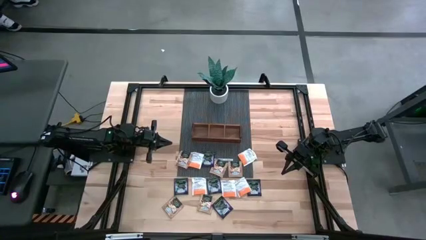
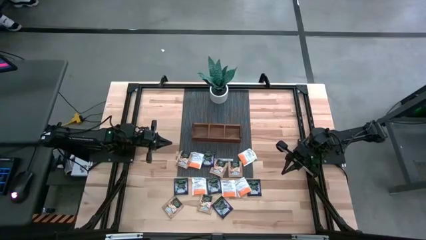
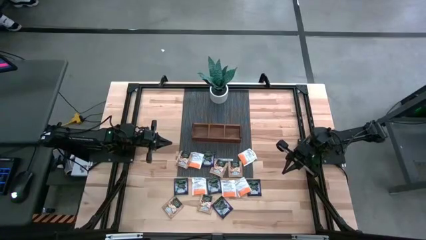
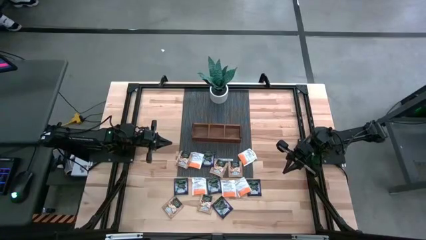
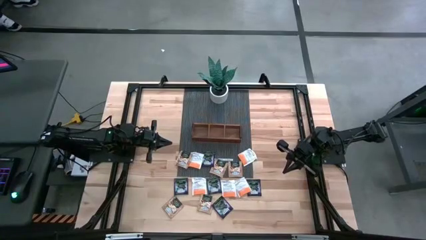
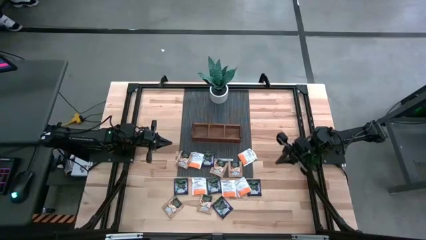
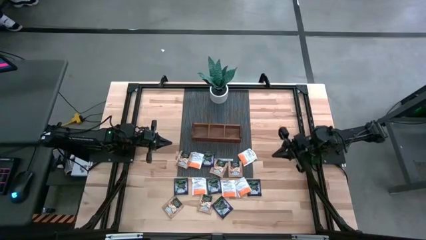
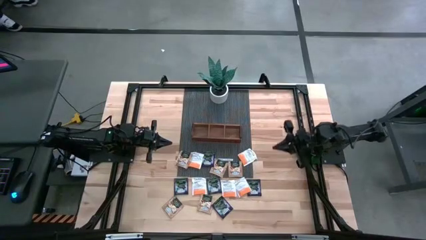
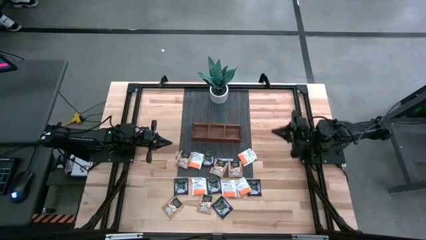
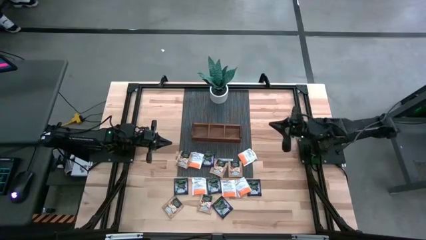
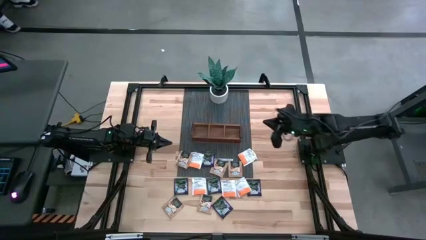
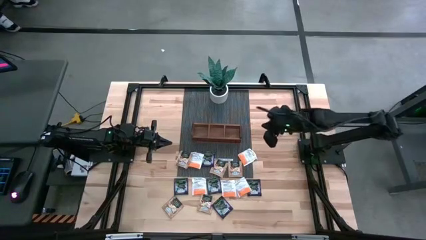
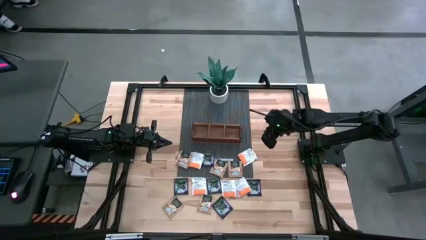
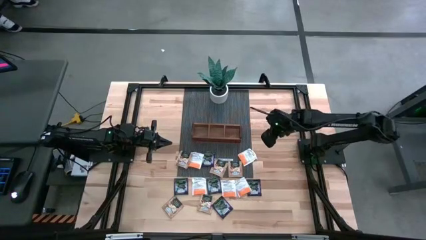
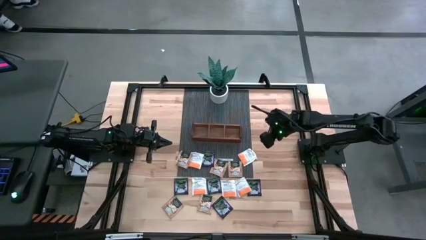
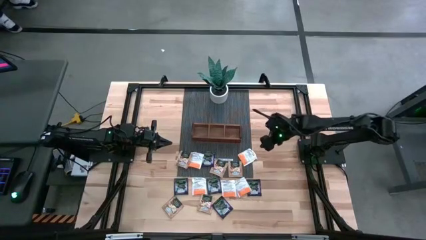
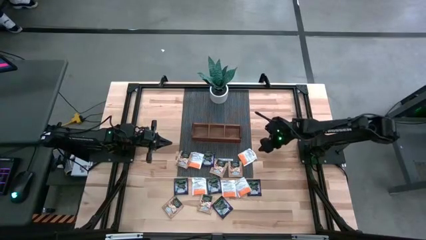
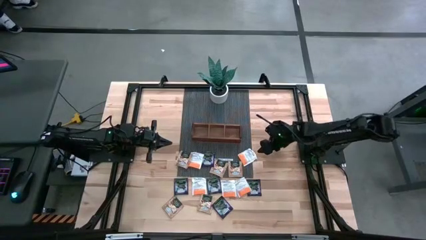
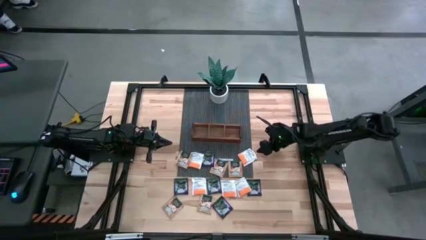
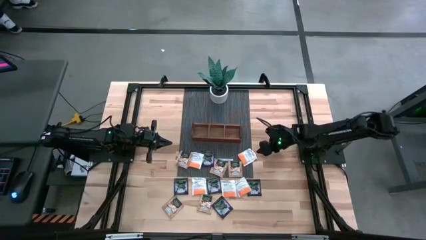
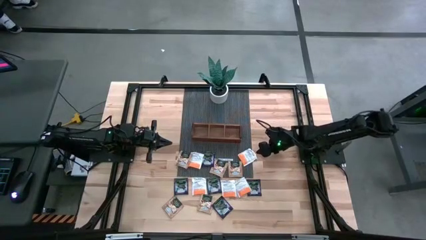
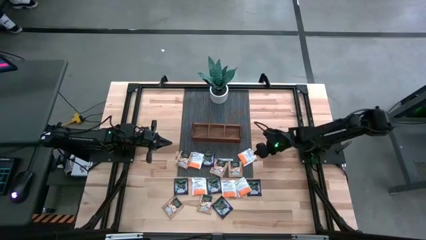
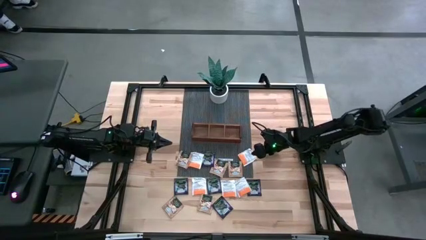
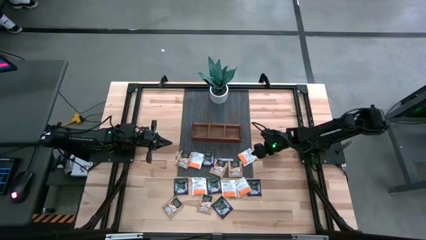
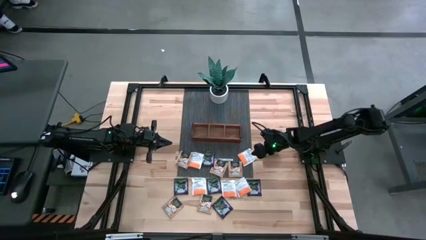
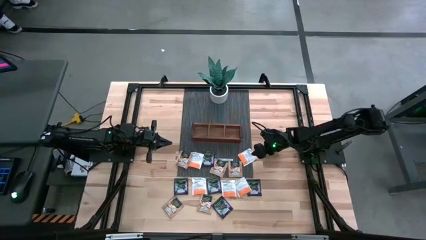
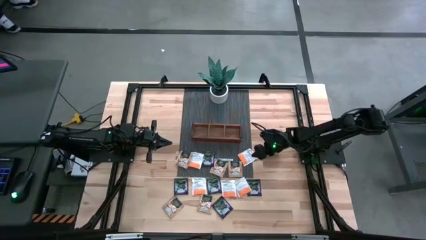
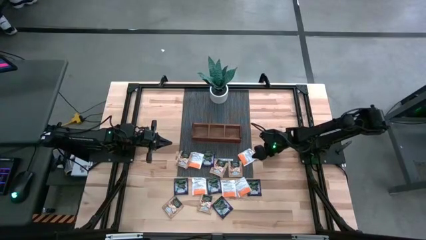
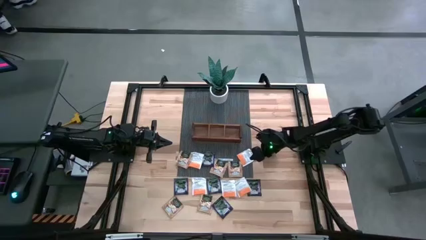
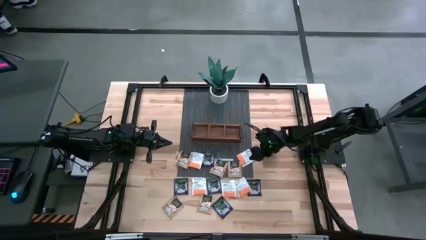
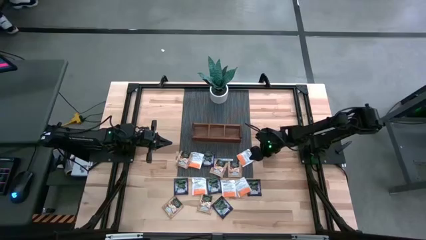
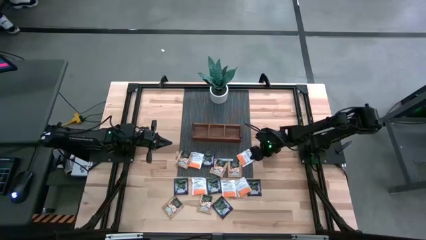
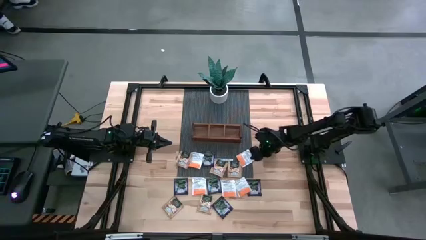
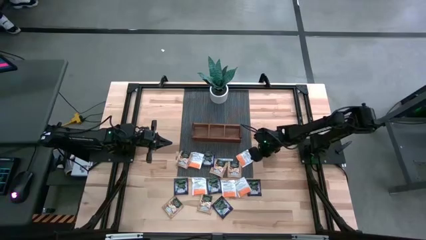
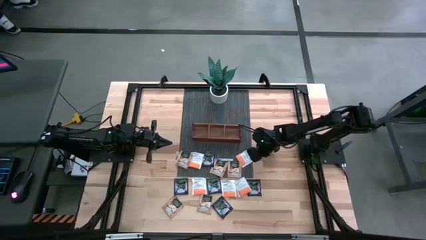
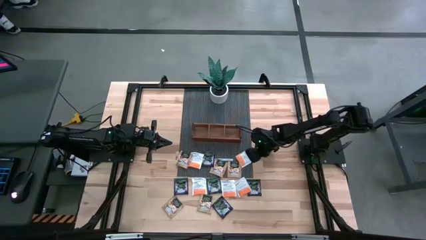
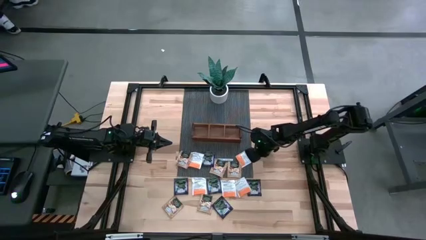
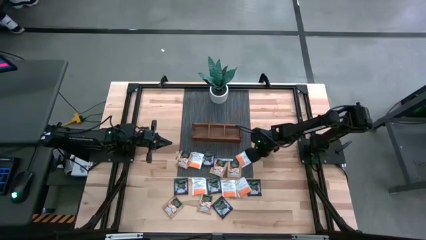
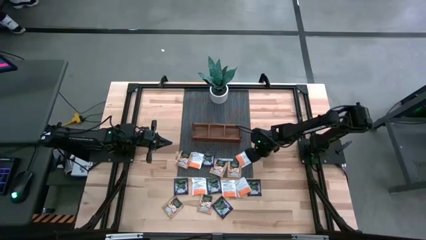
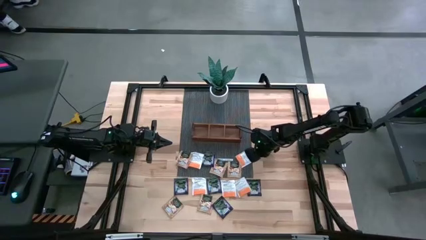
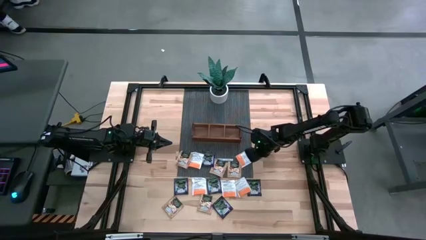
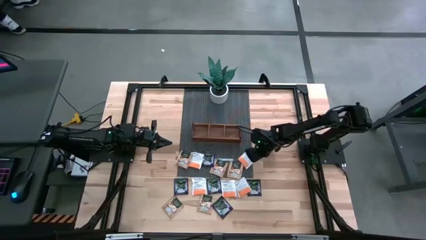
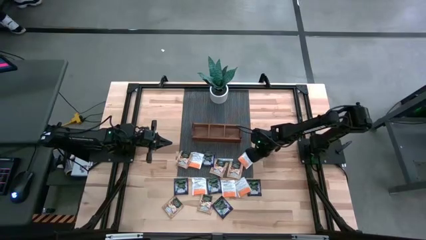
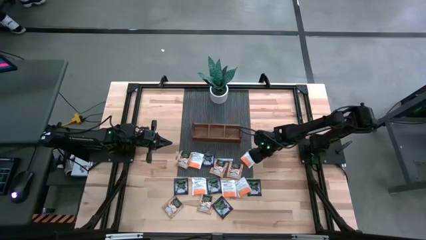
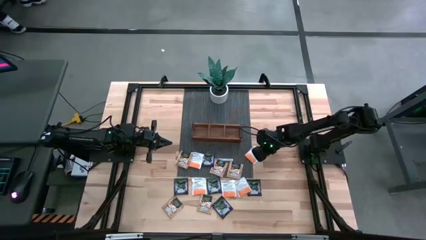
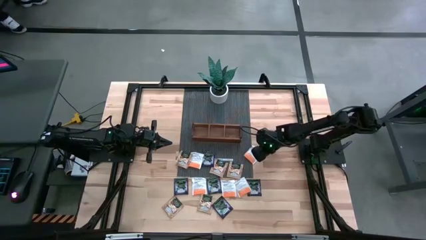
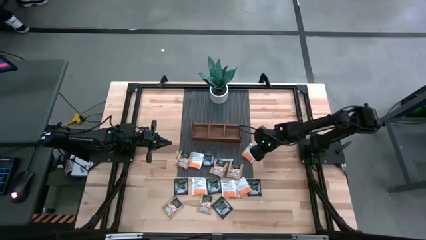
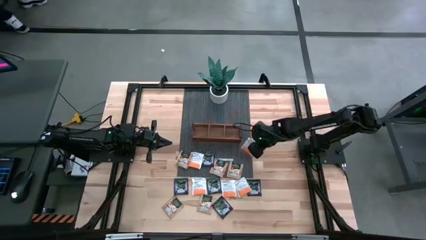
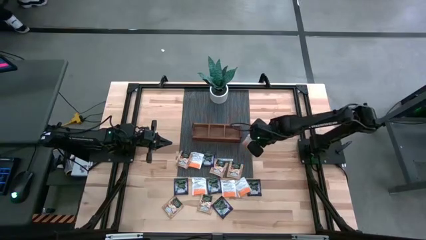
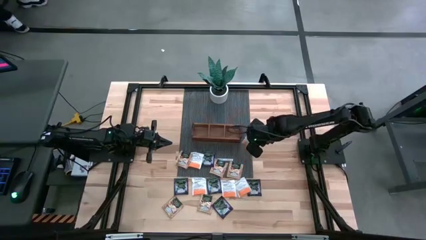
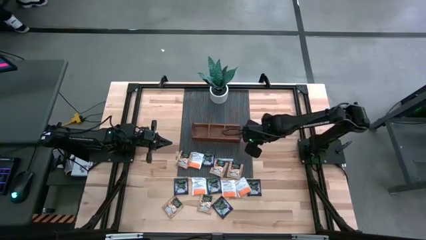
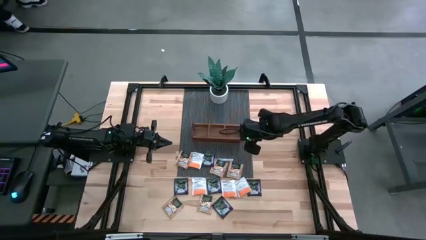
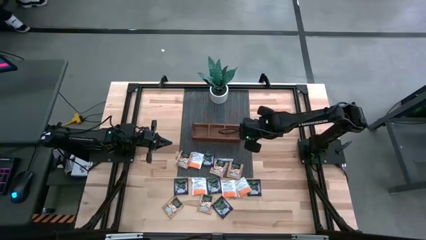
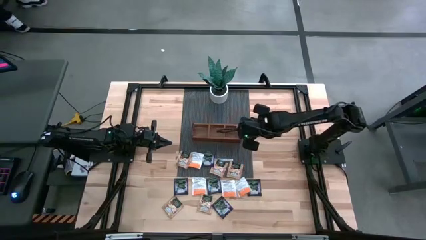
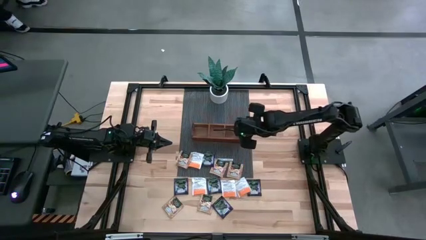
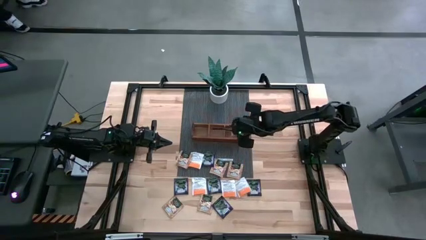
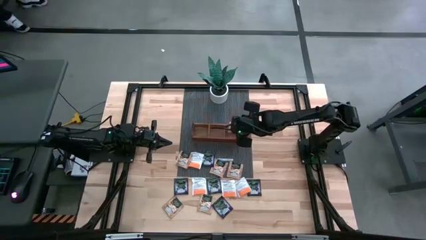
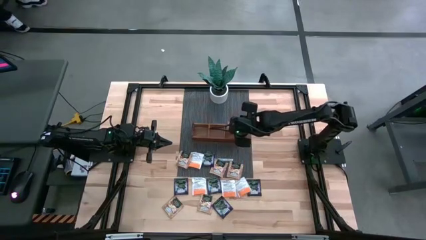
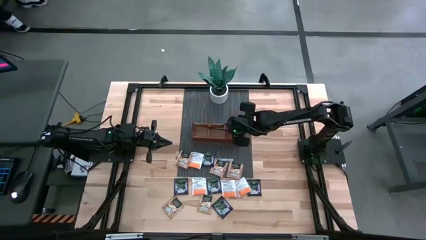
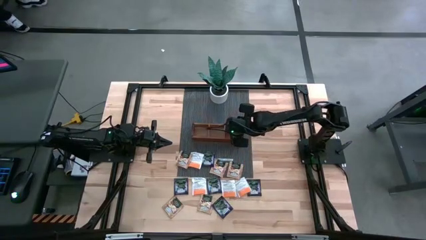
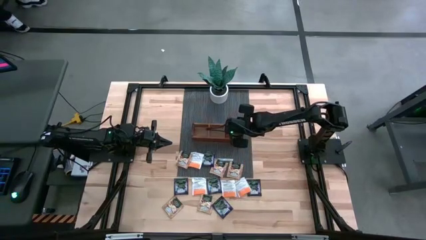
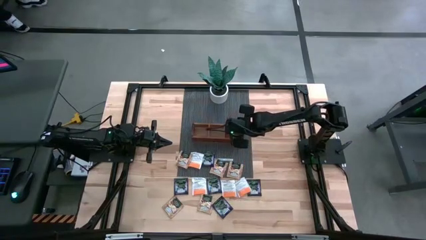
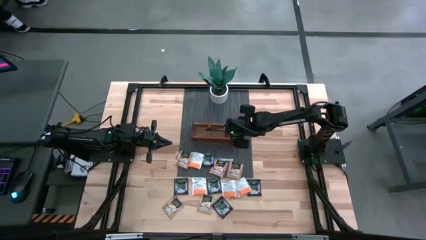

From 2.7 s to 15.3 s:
Task: Pick & Place Tea
Put the white tea bag into the right section of the wooden organizer
